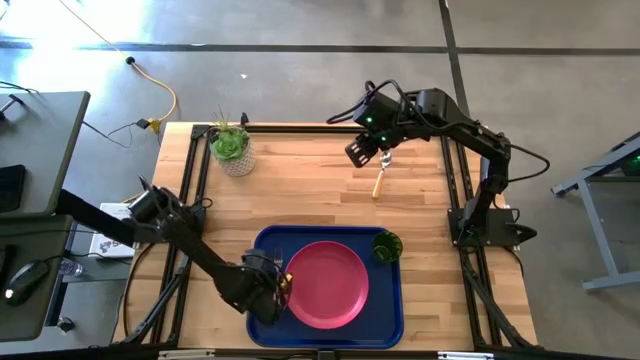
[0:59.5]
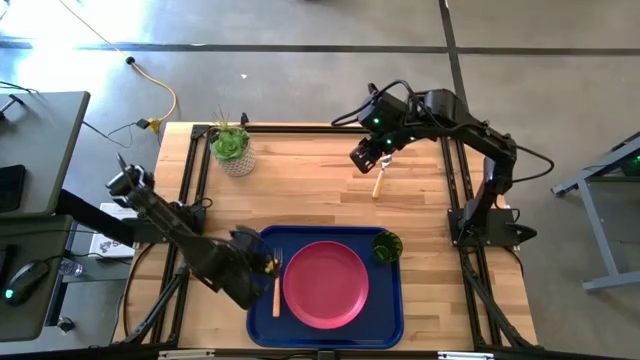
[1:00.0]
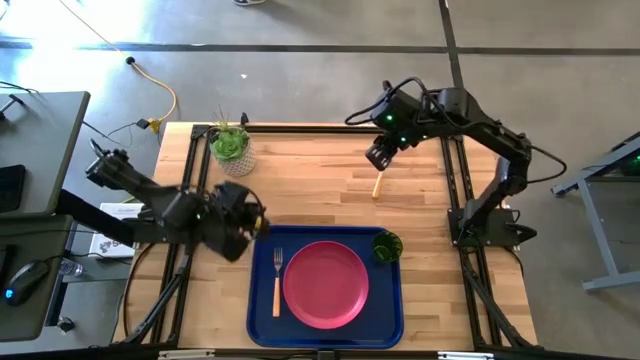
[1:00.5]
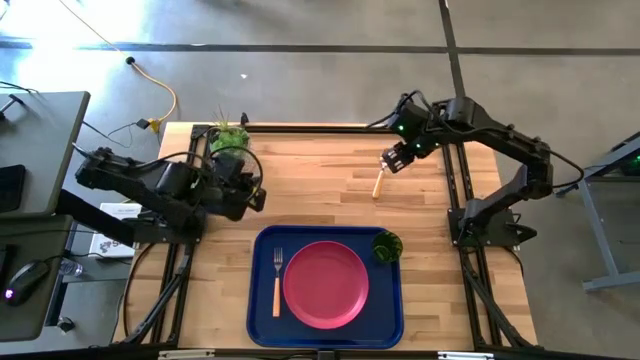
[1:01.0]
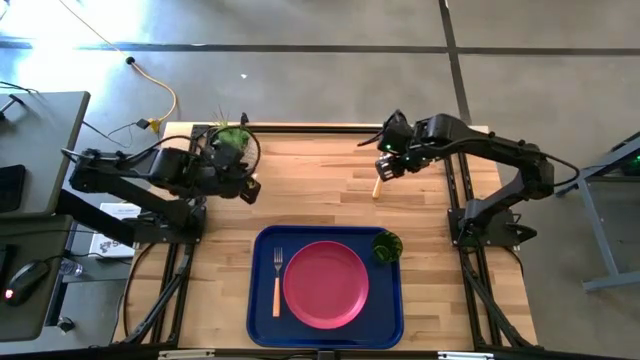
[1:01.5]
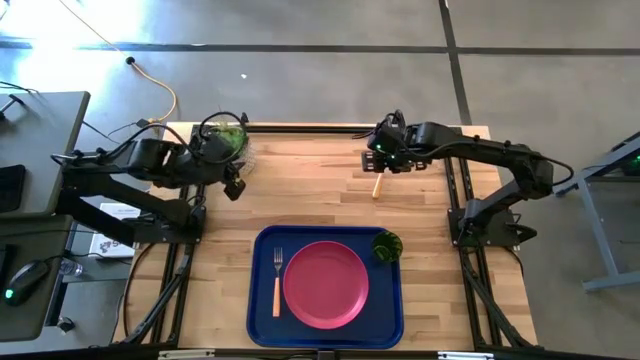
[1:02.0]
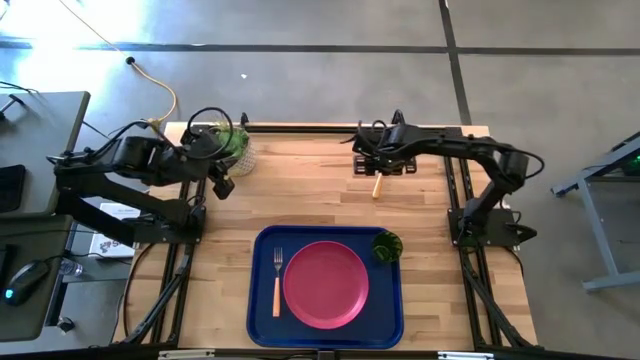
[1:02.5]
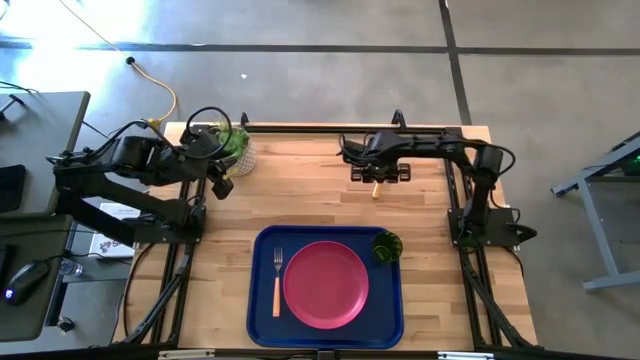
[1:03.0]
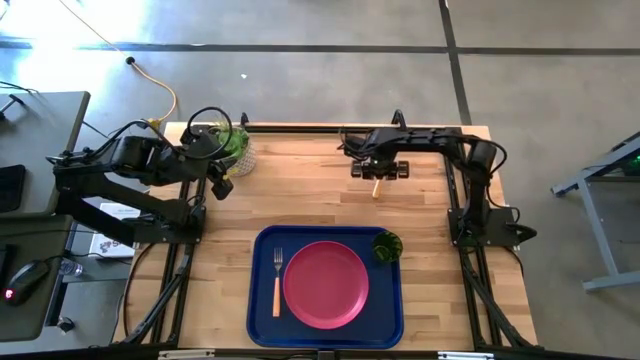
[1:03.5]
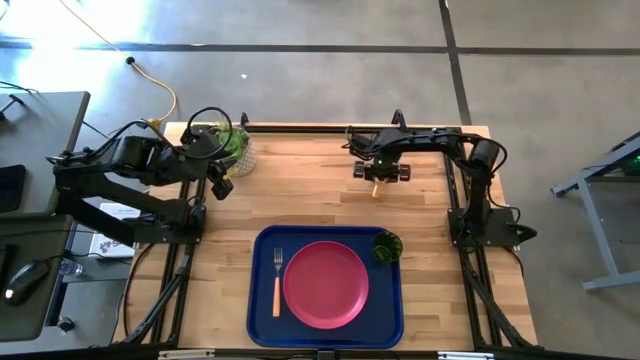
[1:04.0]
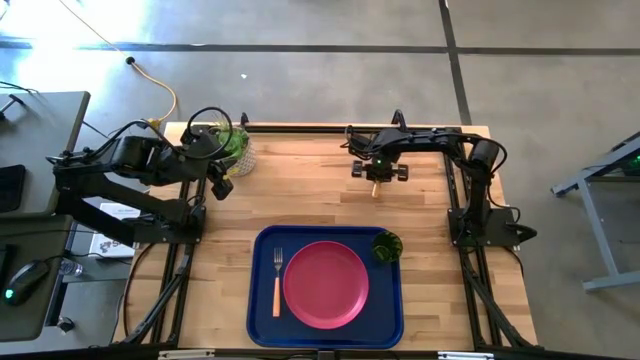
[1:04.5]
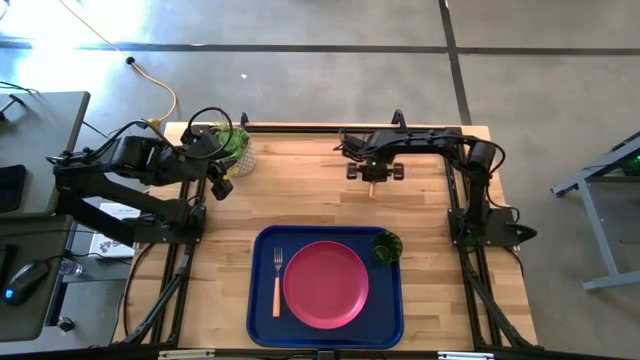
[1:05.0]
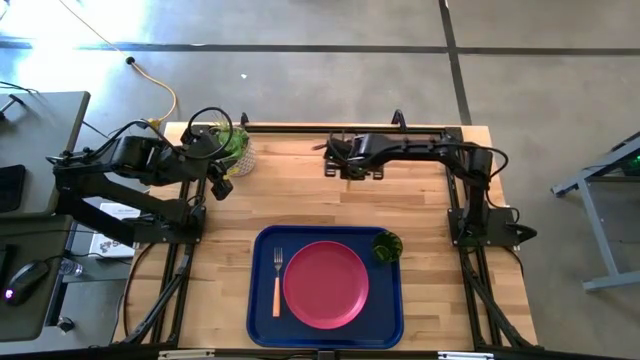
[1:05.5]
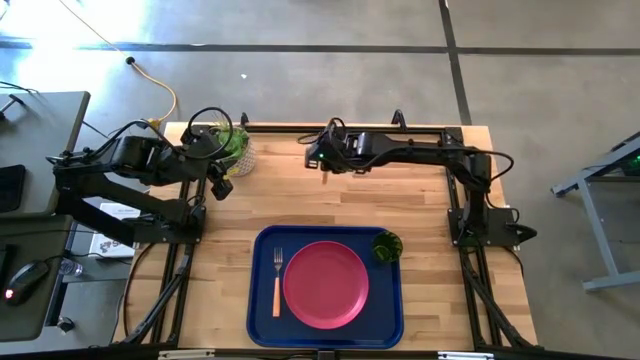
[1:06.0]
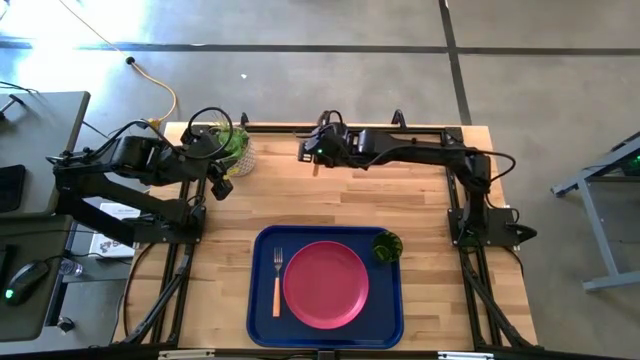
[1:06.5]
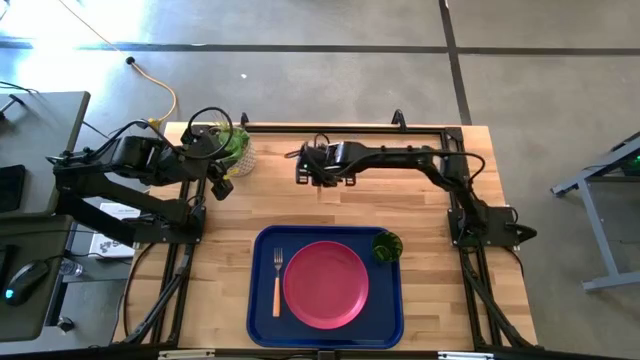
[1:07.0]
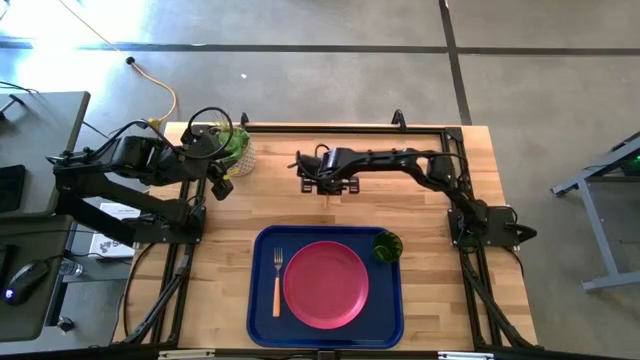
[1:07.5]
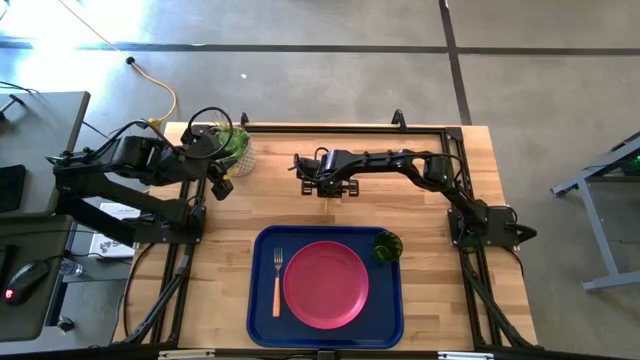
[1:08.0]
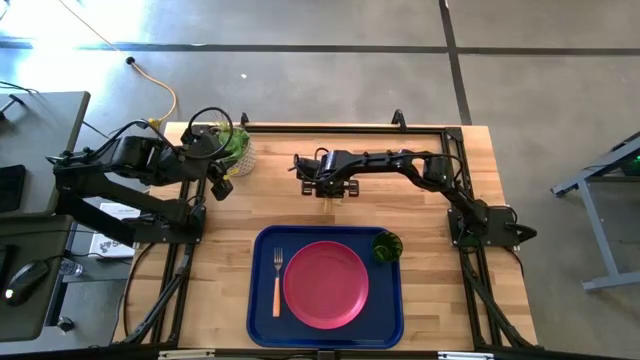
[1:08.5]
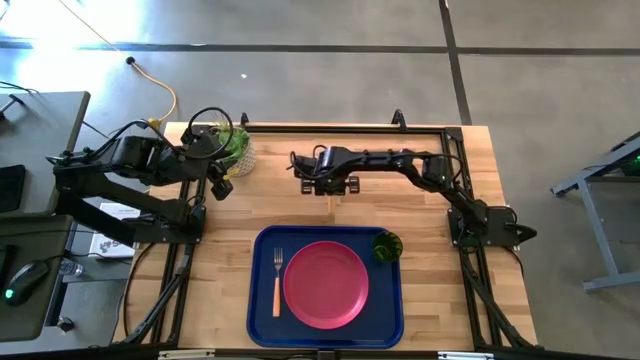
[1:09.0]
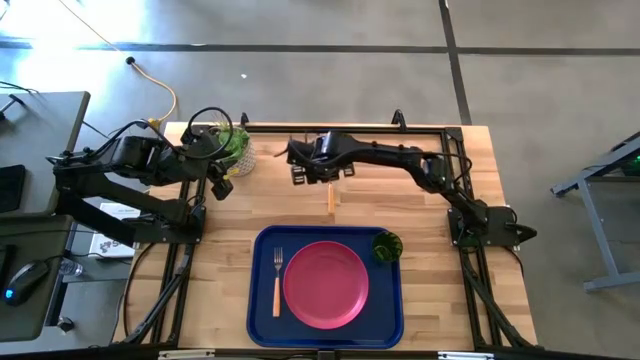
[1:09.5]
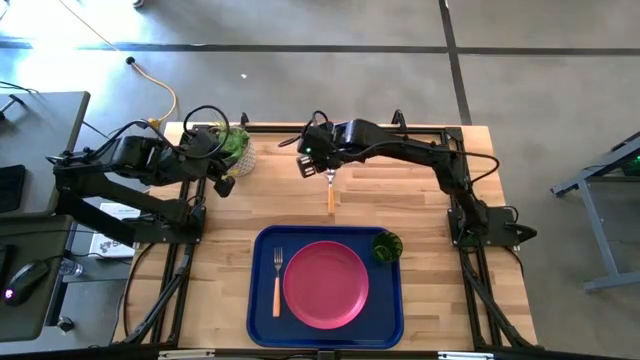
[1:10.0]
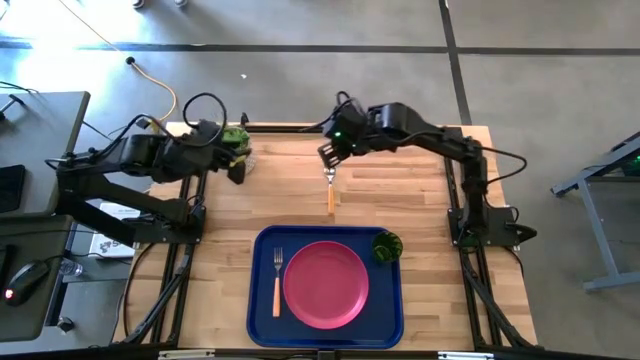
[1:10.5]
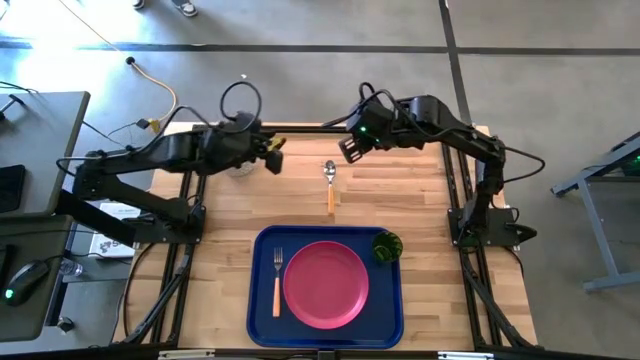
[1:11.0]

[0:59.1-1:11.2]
Task: Pick and place plate/cup/fork/spoon on tray
Put the orange spoon on the blue tray to the left side of the yellow fork

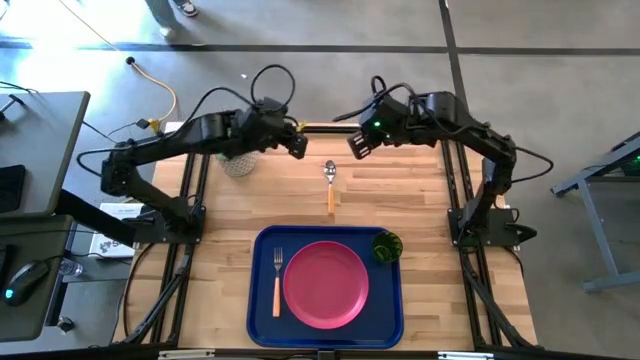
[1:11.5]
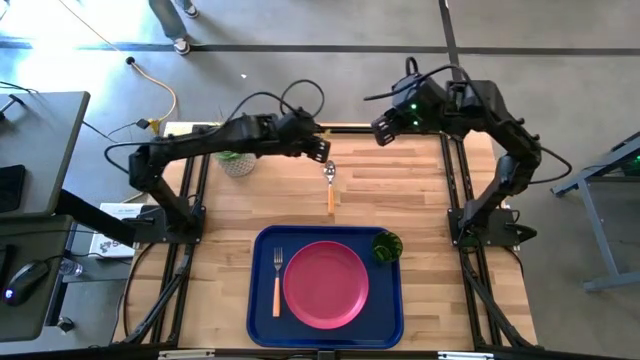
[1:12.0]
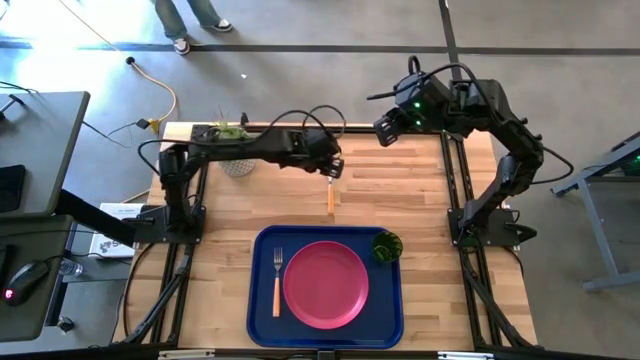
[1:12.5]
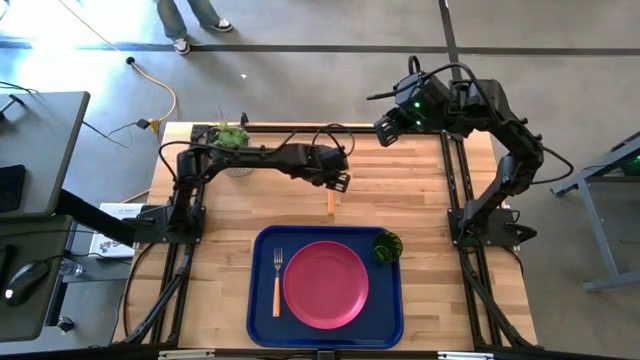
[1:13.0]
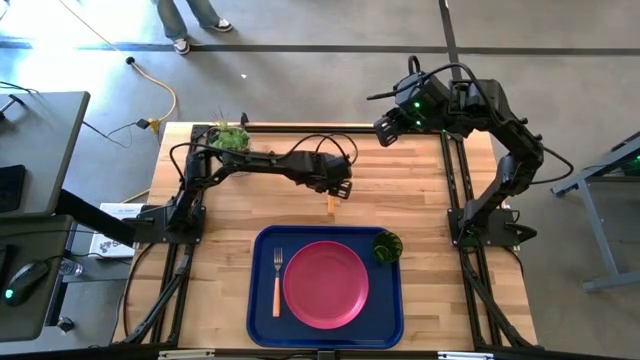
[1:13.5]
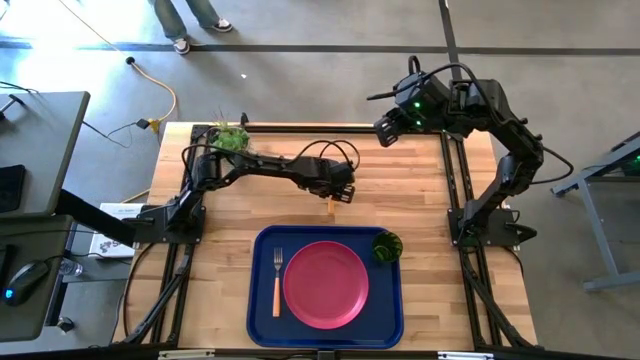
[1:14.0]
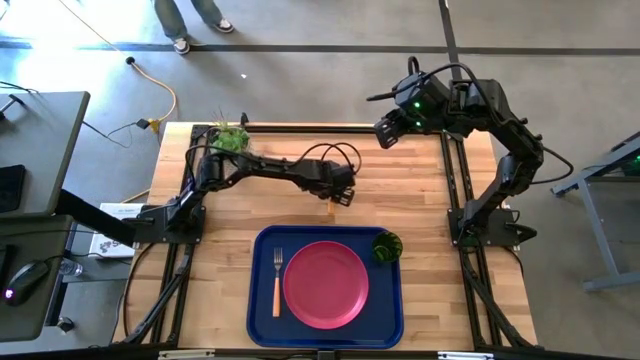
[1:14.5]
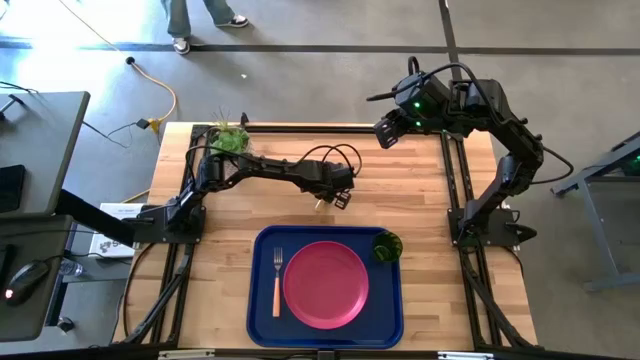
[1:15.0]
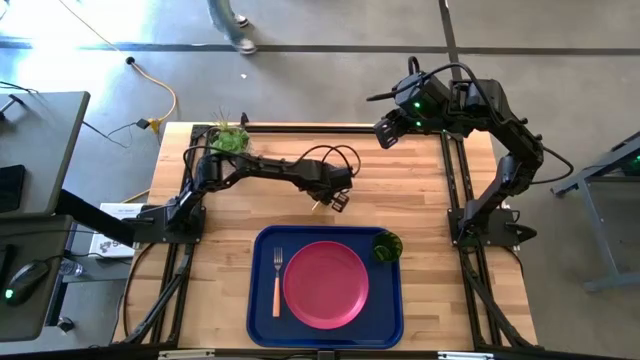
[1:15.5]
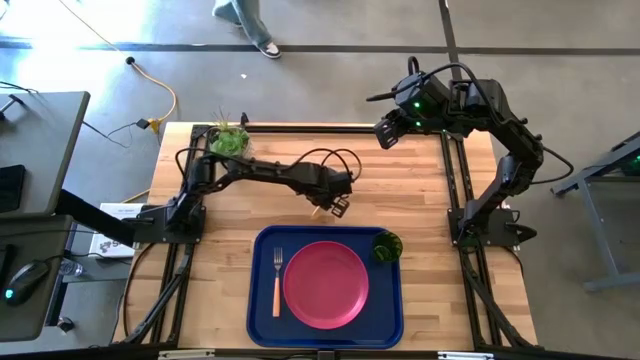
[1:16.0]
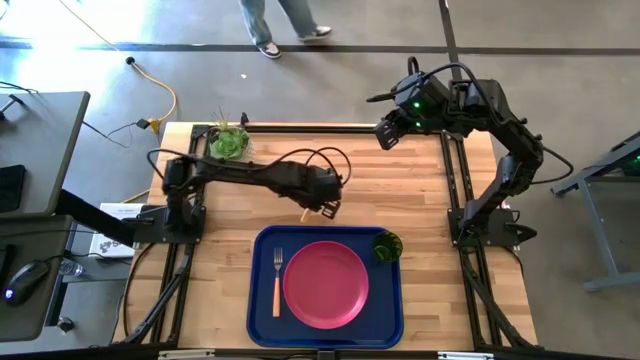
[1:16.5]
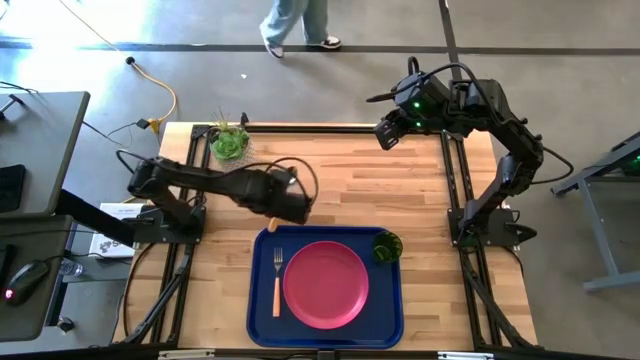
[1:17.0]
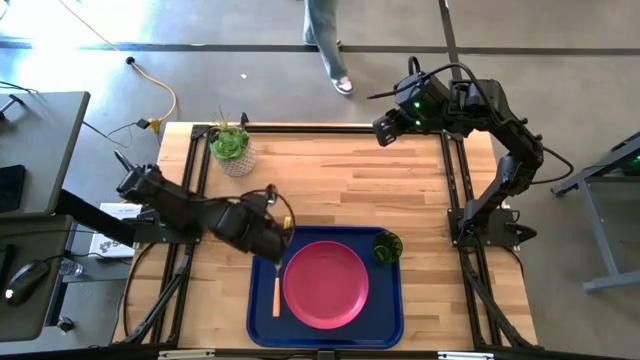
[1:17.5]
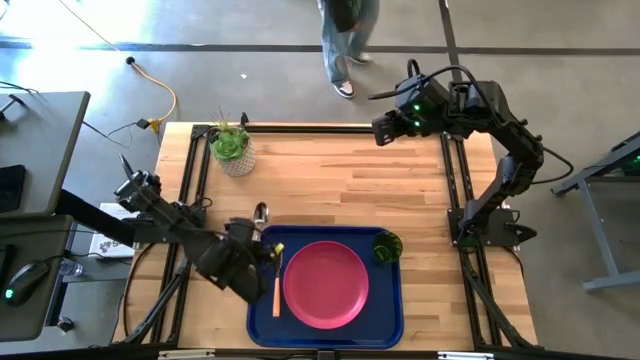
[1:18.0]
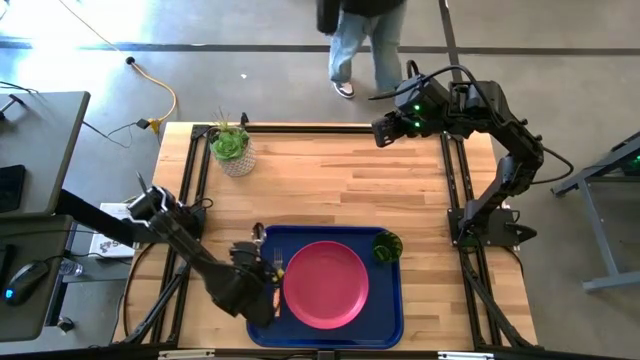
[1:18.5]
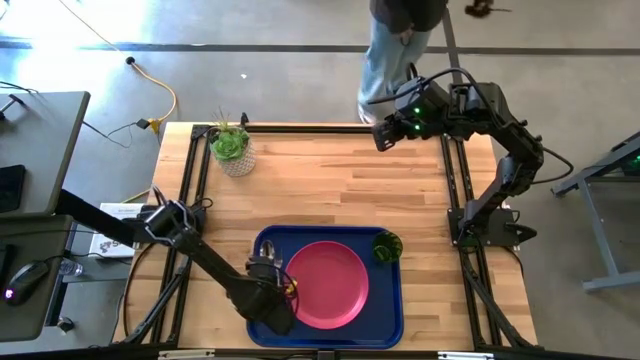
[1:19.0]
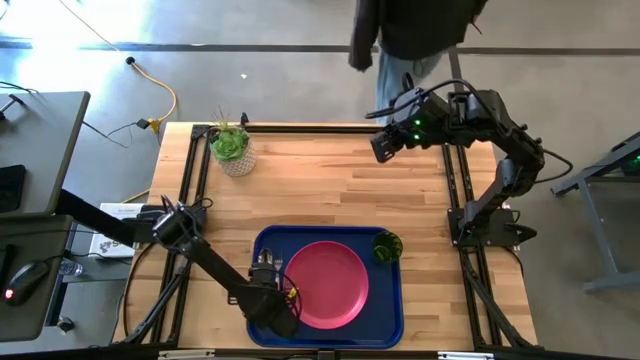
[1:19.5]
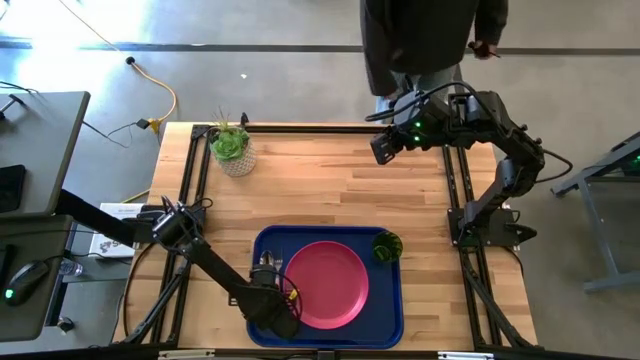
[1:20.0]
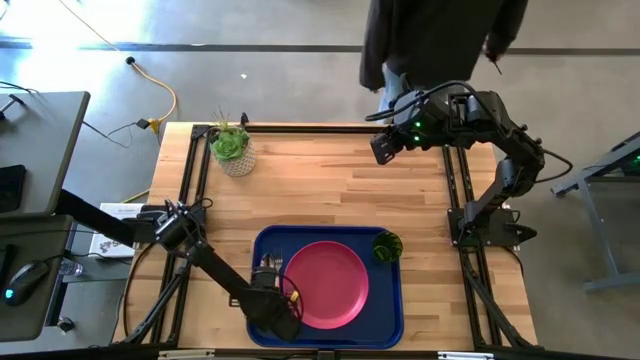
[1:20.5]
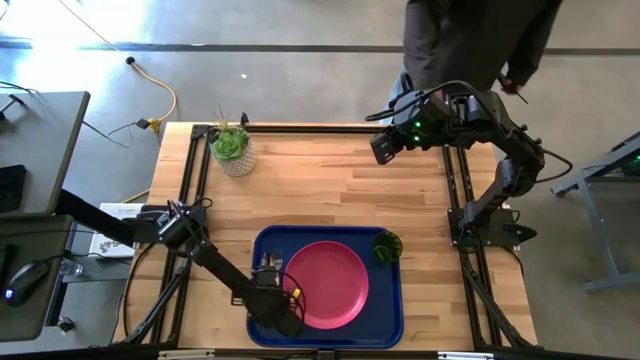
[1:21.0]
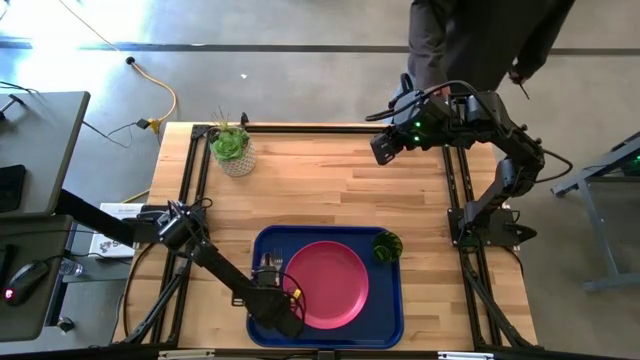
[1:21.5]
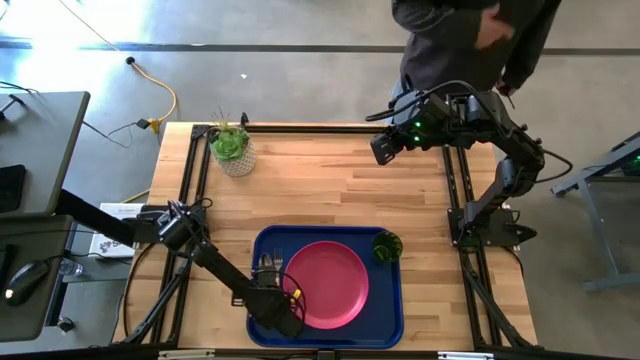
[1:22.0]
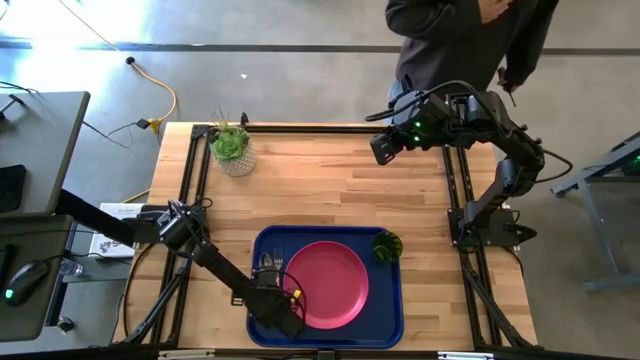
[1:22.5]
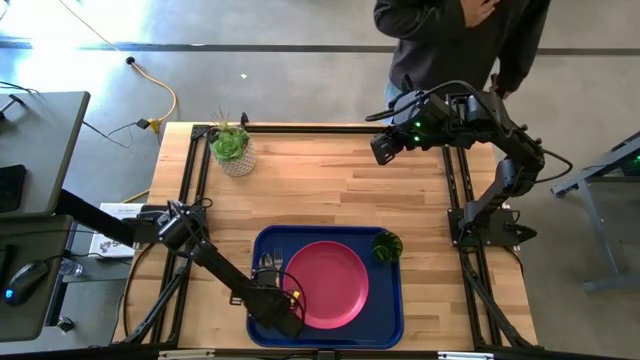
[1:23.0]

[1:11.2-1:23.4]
Put the orange spoon on the blue tray to the left side of the yellow fork
